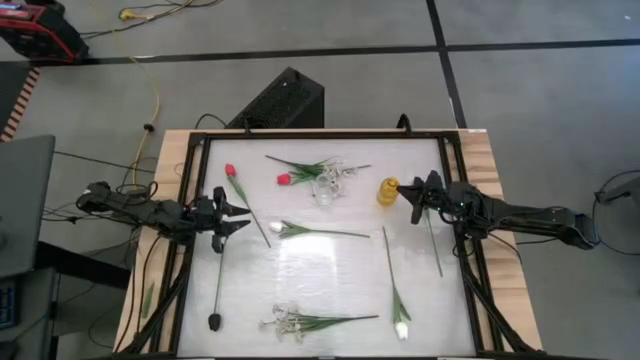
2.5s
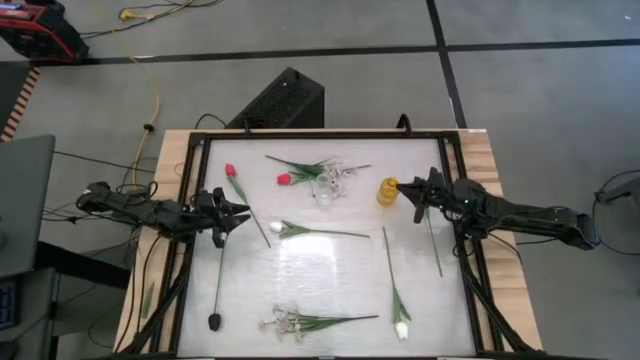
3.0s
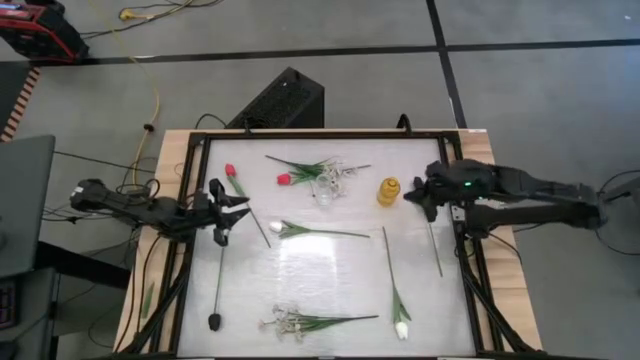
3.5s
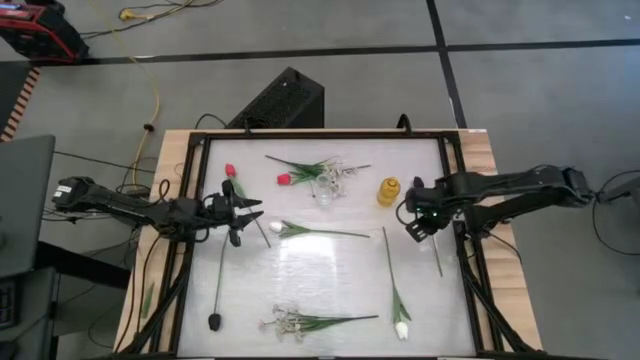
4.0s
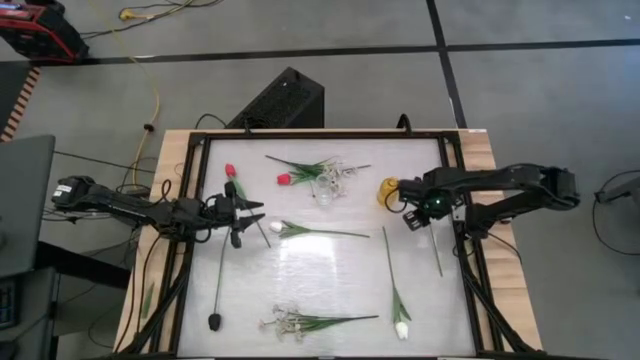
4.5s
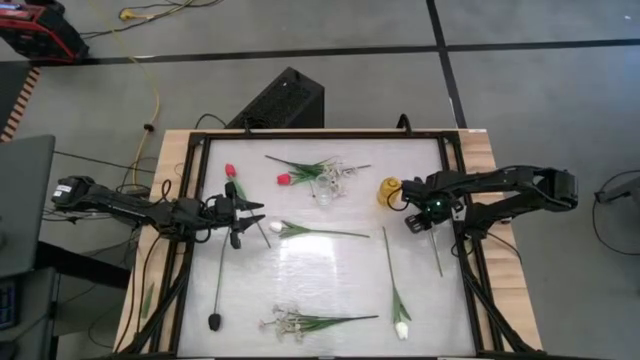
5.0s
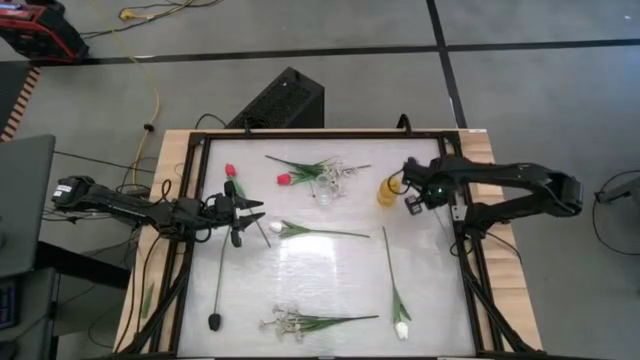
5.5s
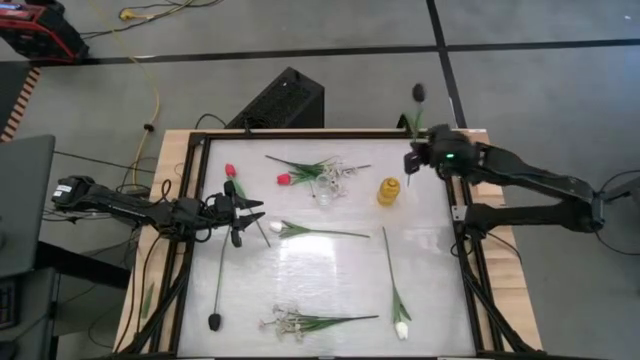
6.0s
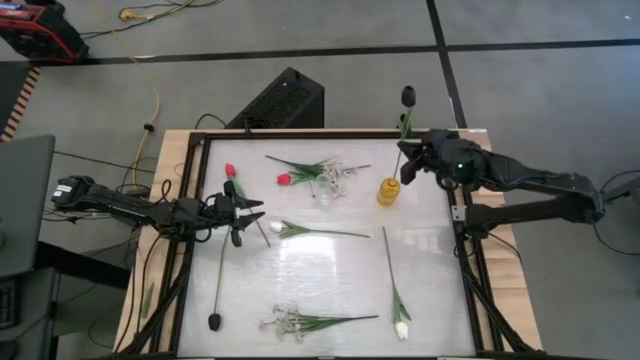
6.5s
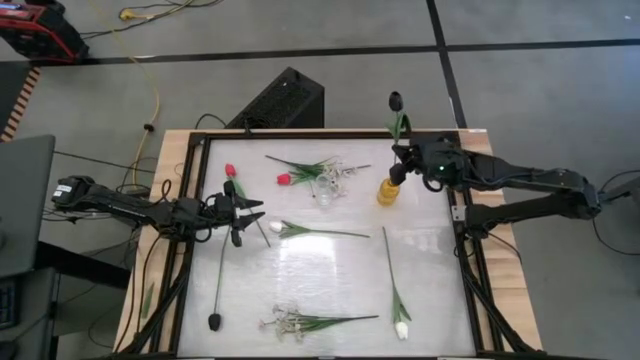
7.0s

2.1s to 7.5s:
Task: Sort flowers into vase by color
Put the right black flower into the yellow vase

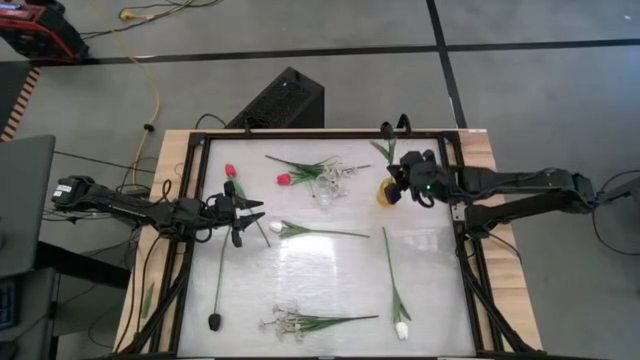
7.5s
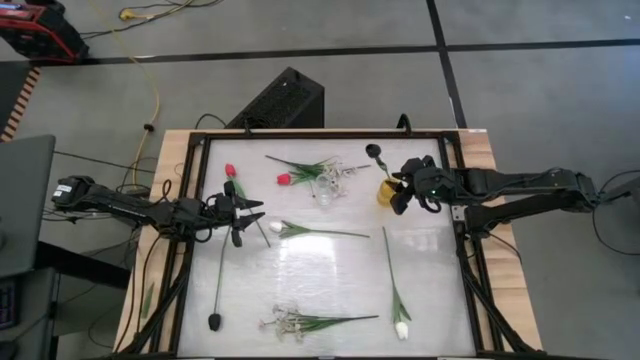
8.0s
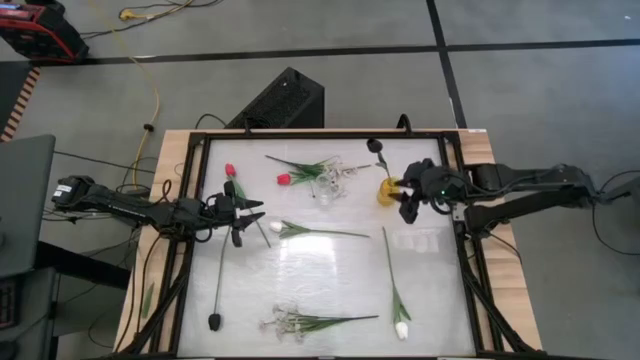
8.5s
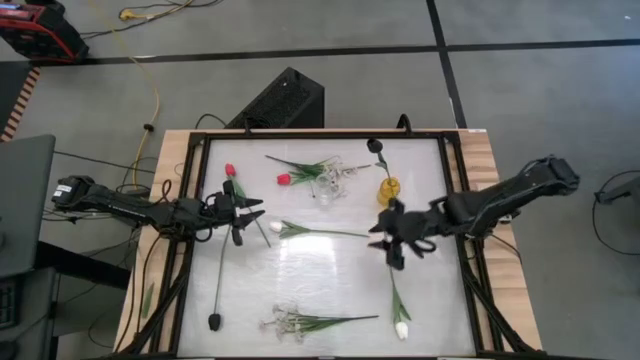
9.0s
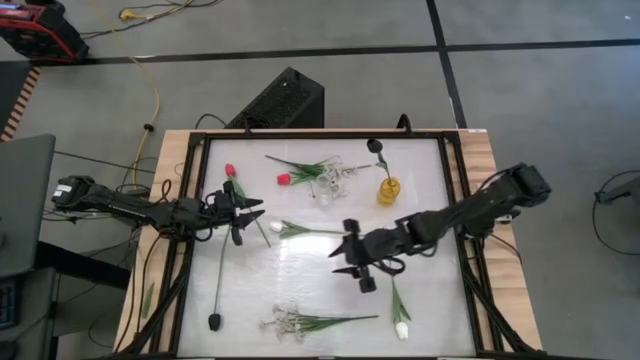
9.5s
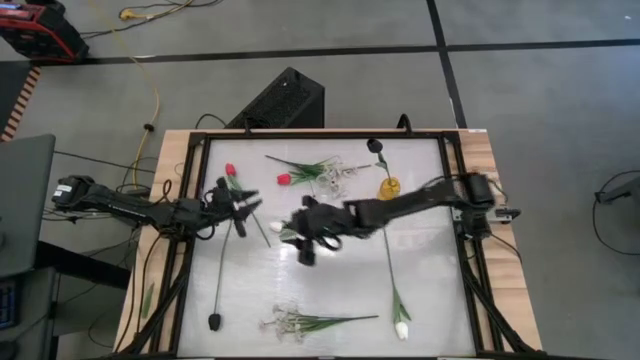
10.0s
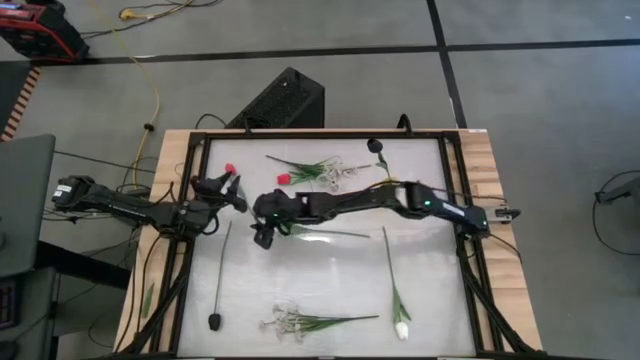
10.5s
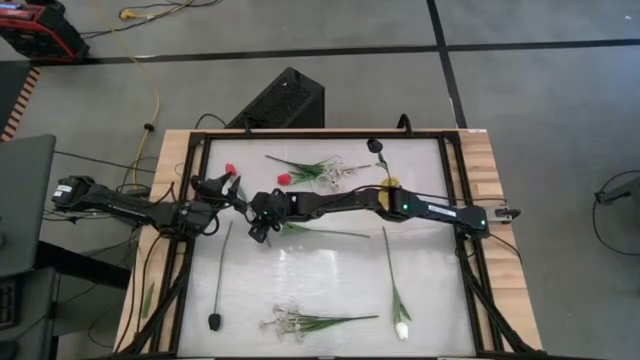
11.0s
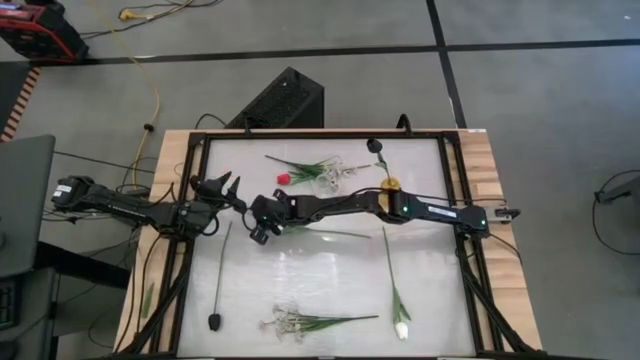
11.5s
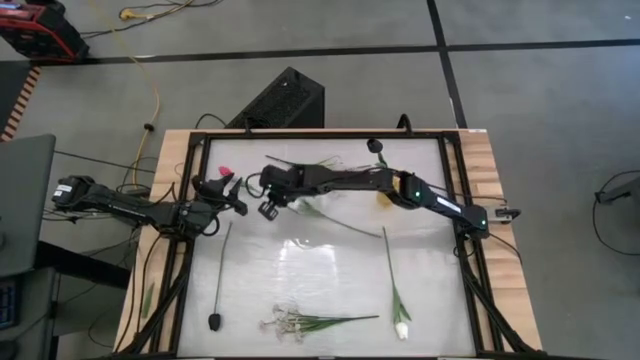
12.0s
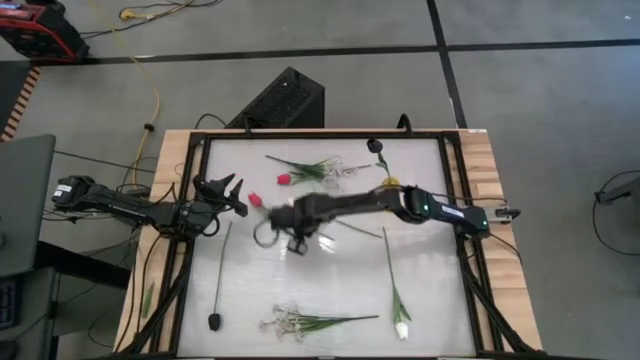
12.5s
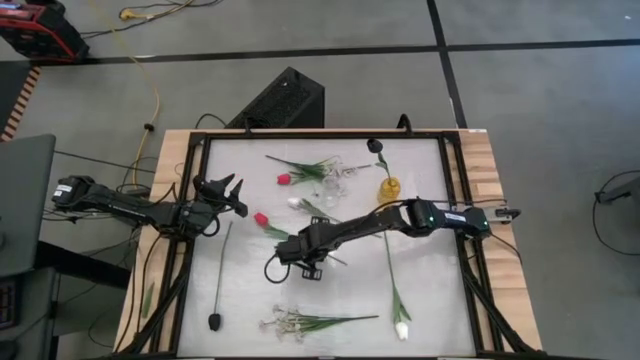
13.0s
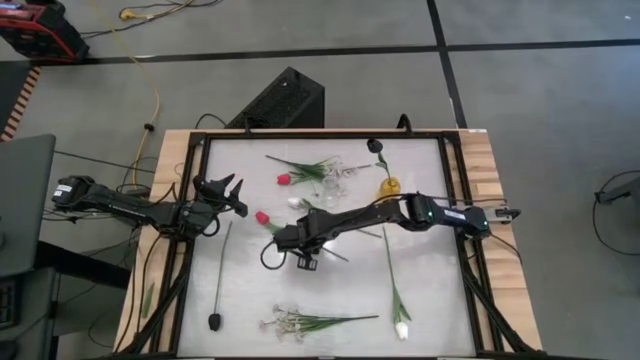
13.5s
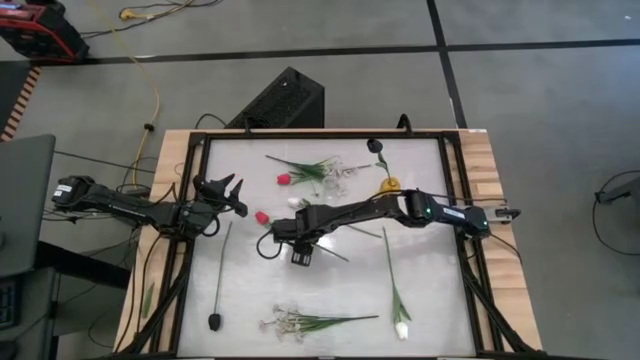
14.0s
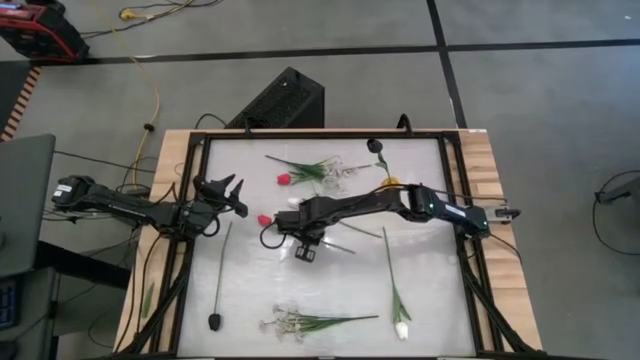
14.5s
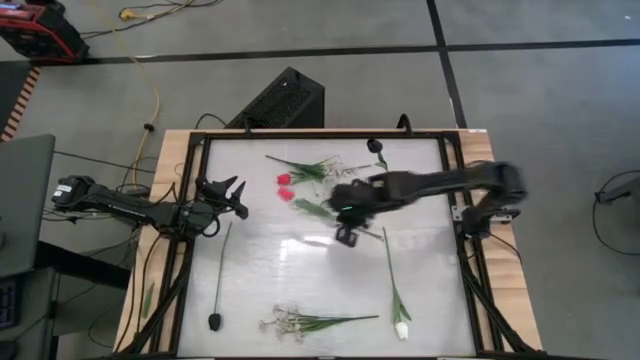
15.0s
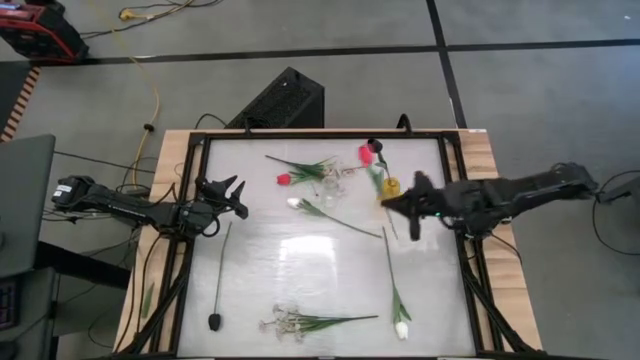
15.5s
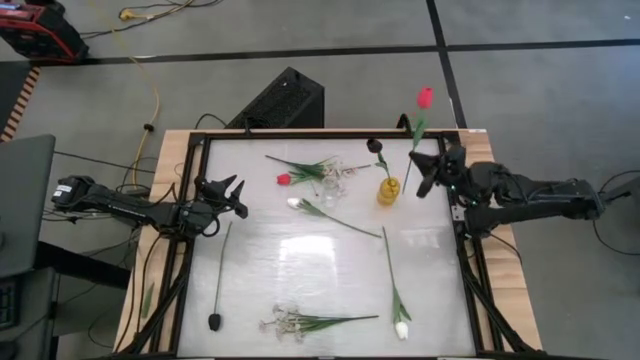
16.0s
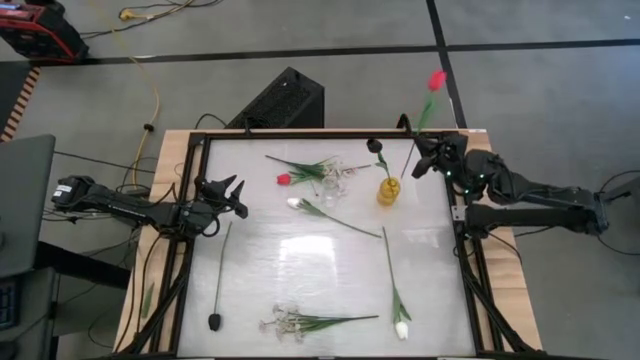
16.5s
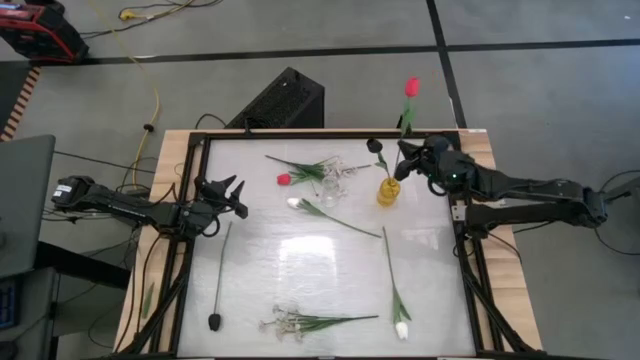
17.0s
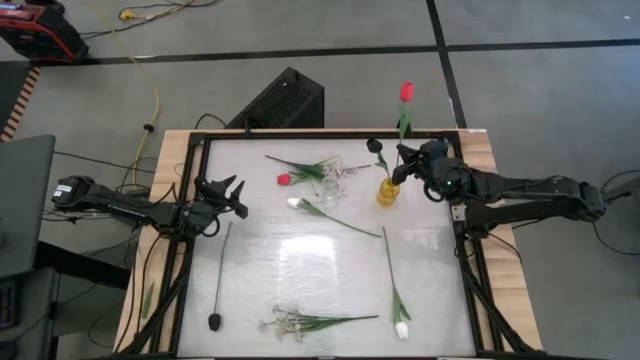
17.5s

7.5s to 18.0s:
Put the left pink flower into the yellow vase

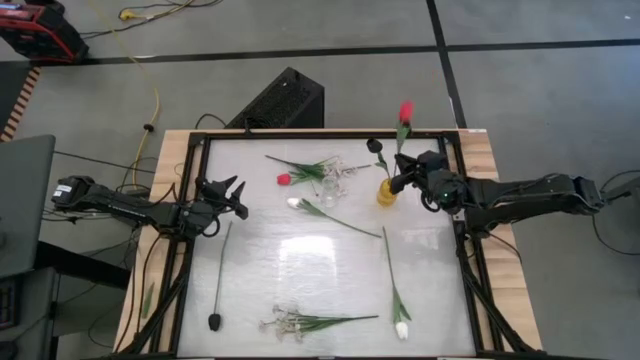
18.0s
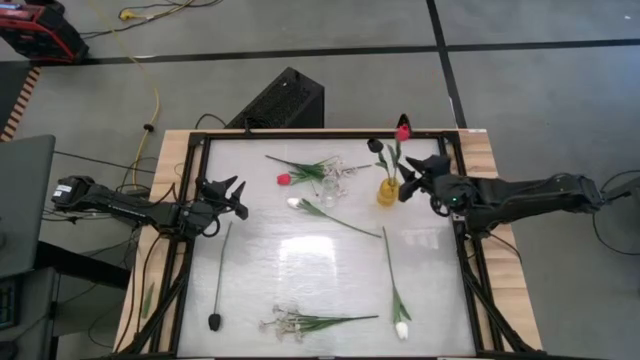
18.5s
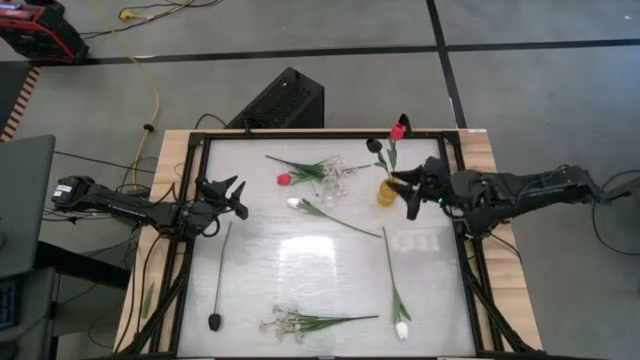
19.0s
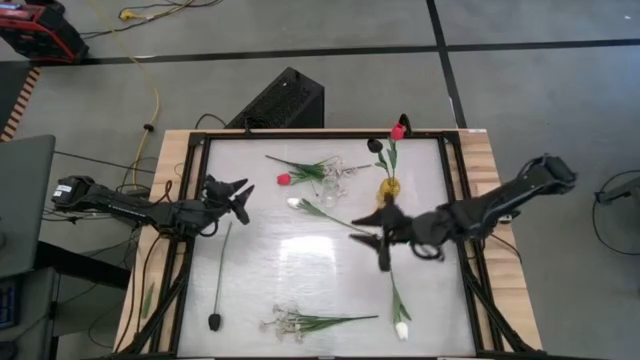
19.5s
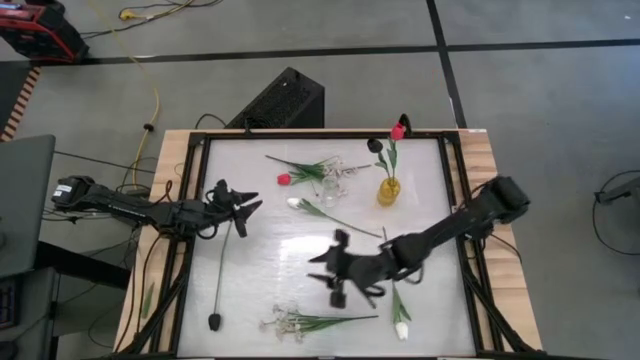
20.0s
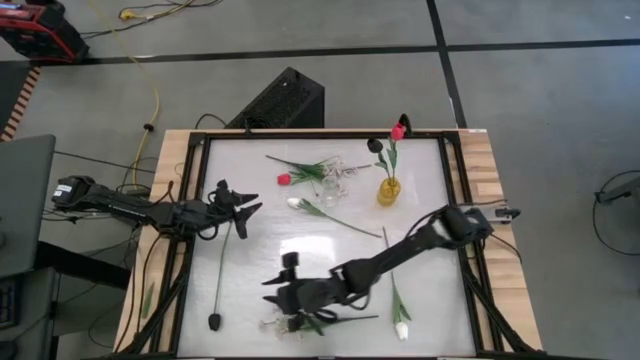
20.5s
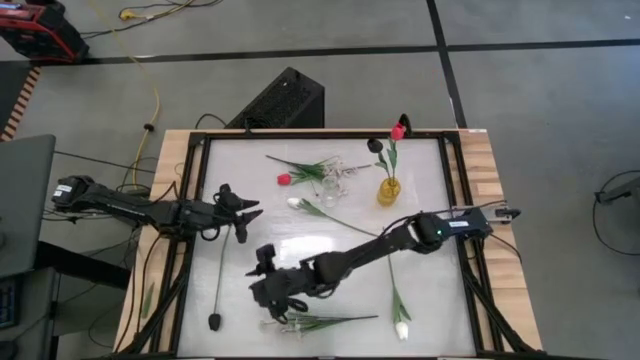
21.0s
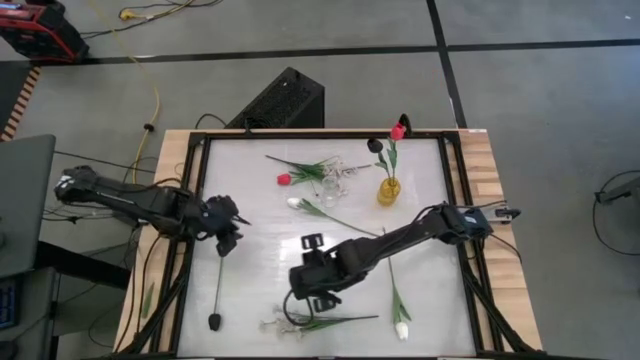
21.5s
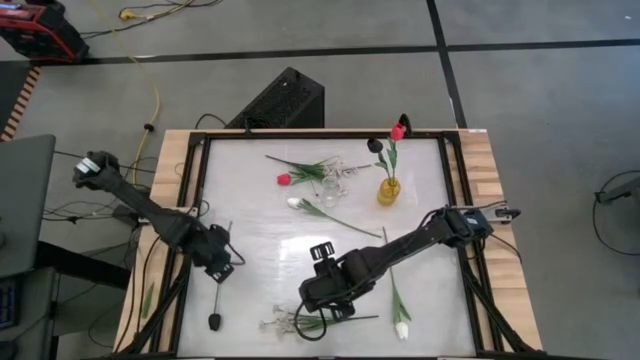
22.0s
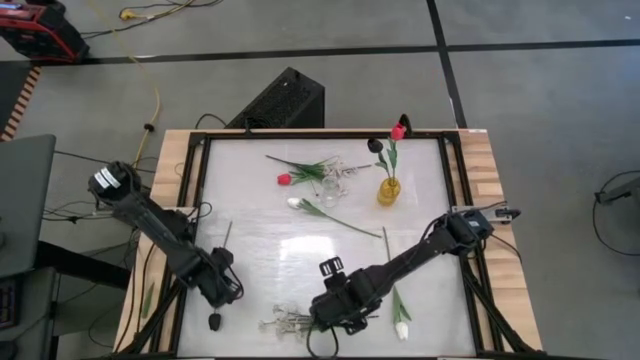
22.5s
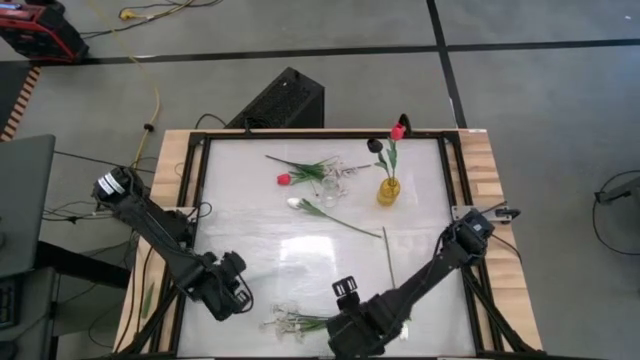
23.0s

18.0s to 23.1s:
Put the black flower into the yellow vase
